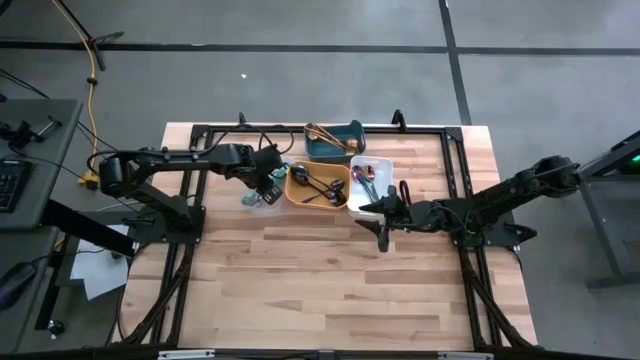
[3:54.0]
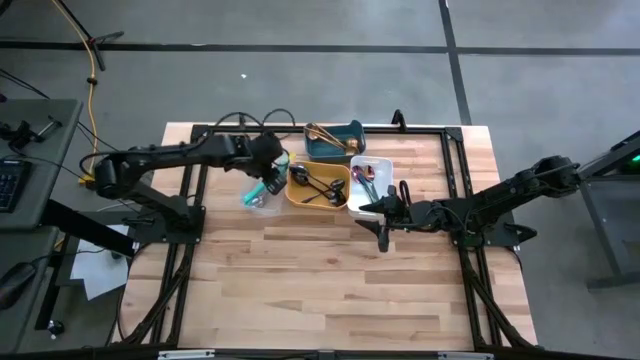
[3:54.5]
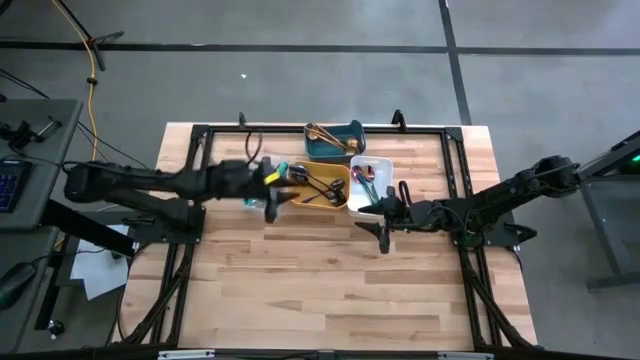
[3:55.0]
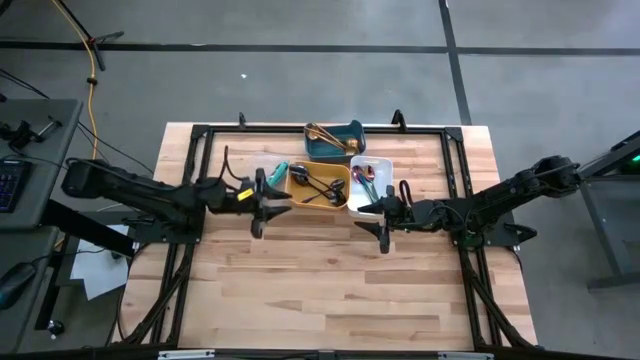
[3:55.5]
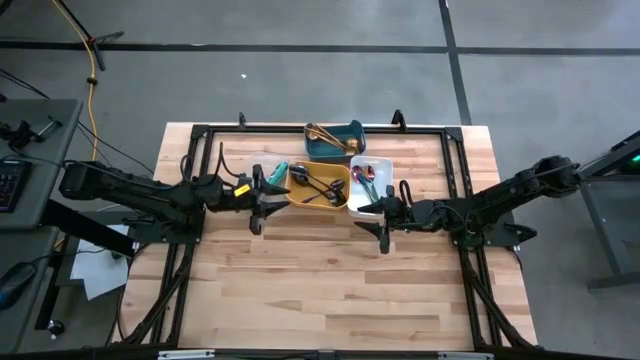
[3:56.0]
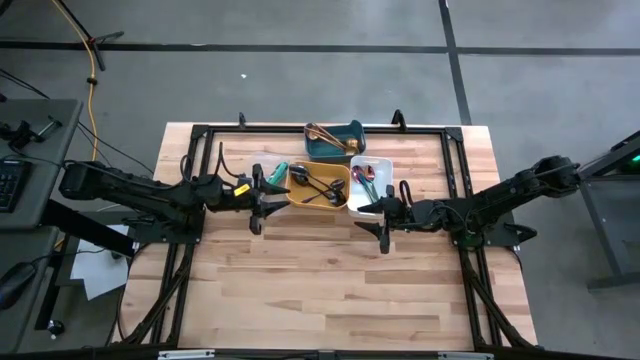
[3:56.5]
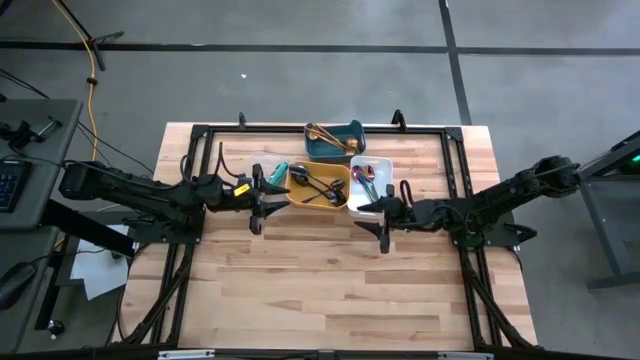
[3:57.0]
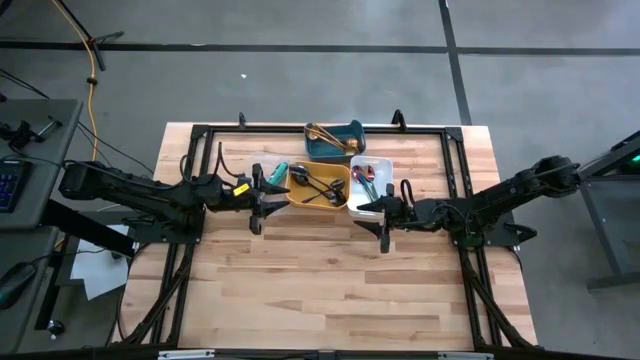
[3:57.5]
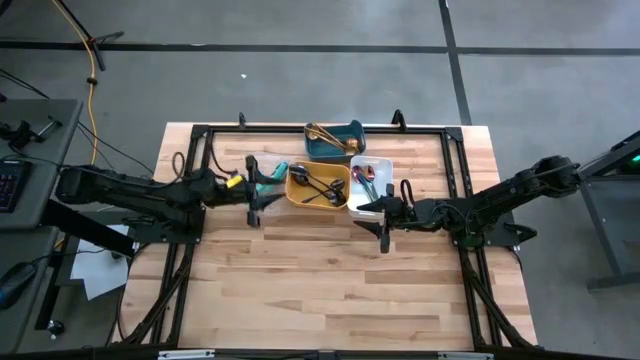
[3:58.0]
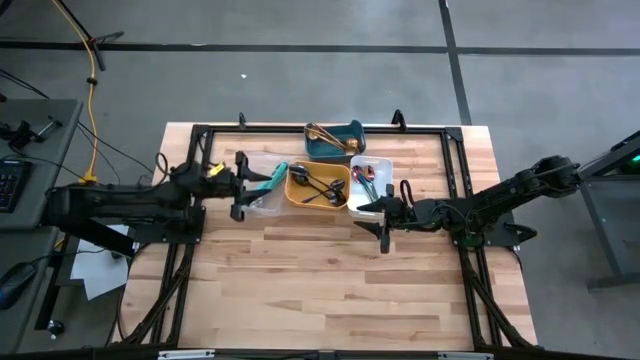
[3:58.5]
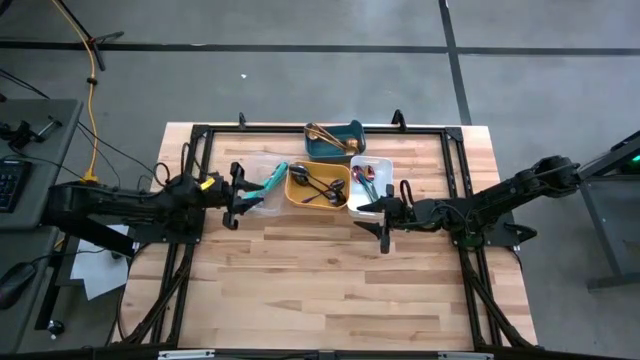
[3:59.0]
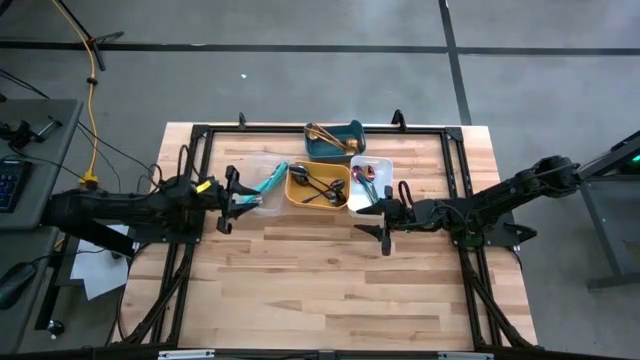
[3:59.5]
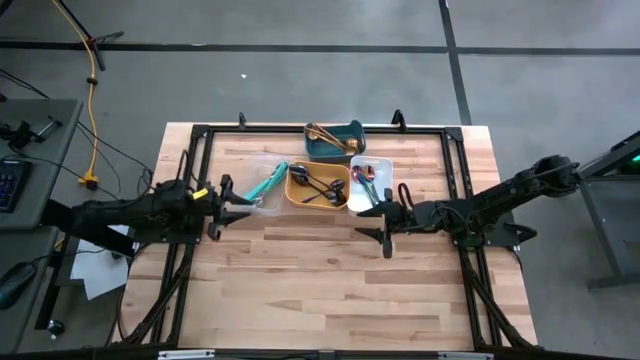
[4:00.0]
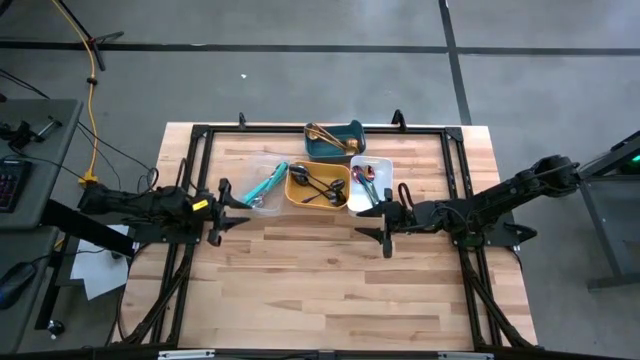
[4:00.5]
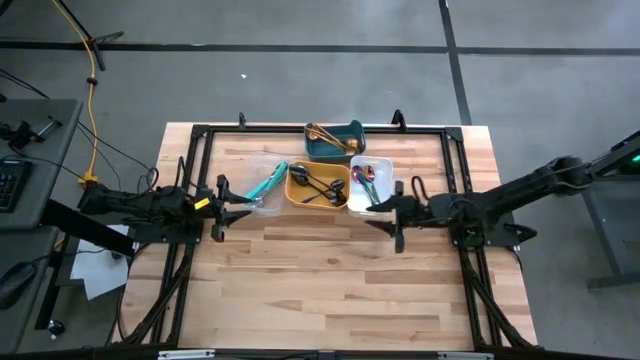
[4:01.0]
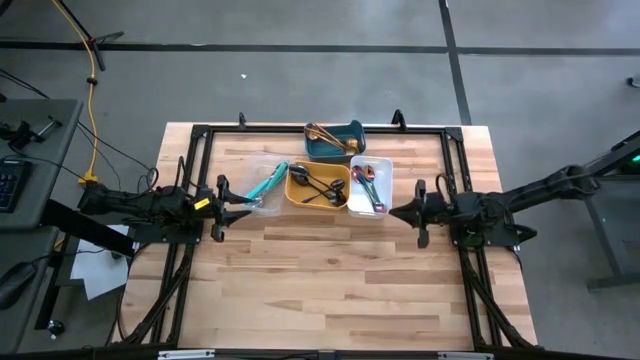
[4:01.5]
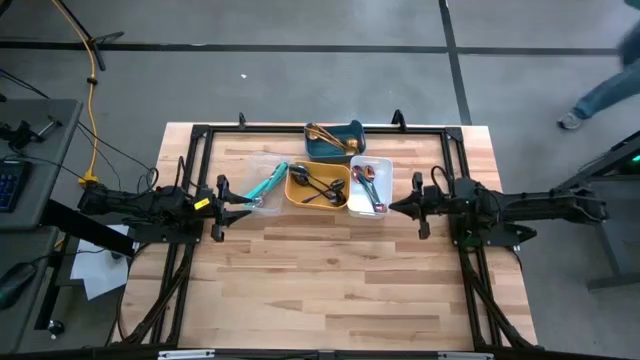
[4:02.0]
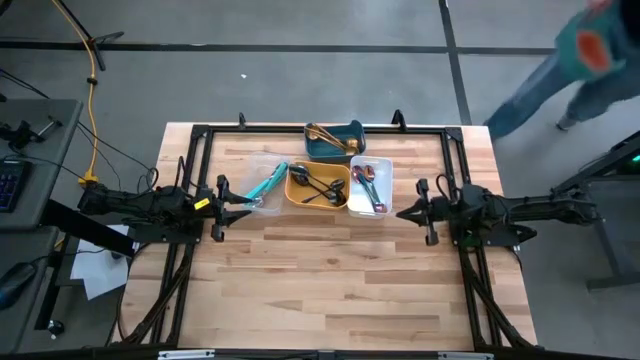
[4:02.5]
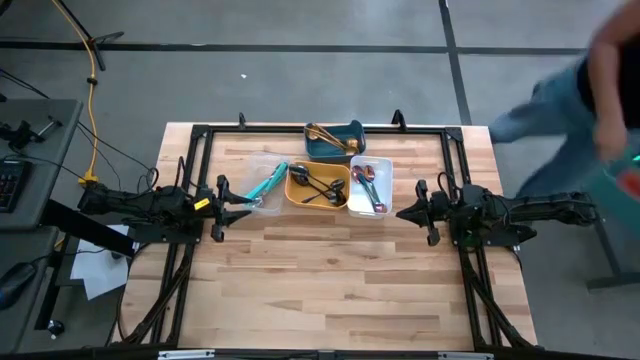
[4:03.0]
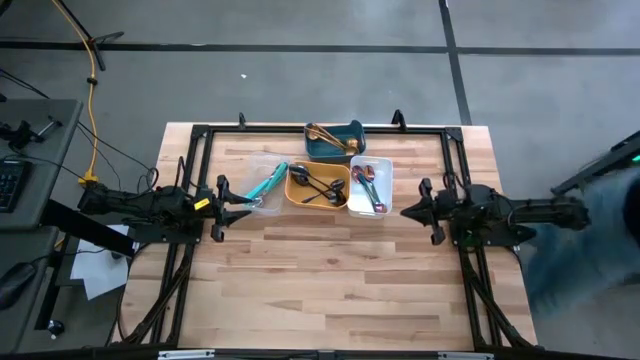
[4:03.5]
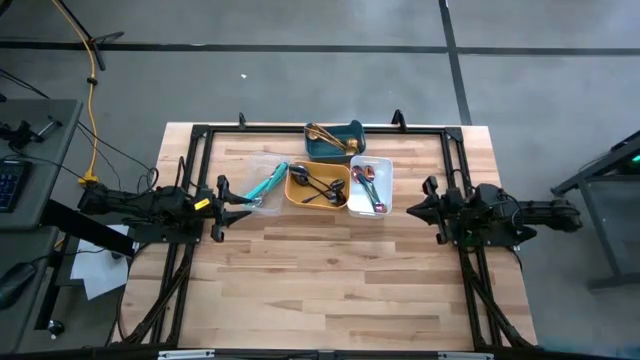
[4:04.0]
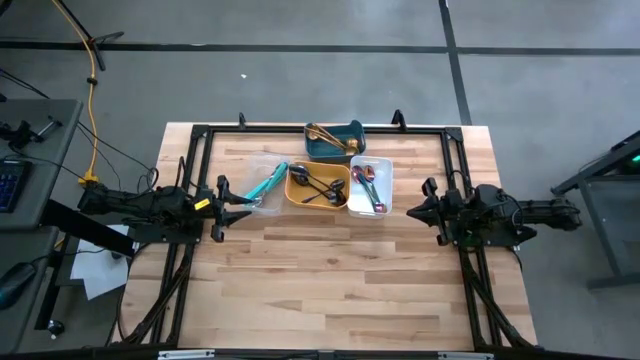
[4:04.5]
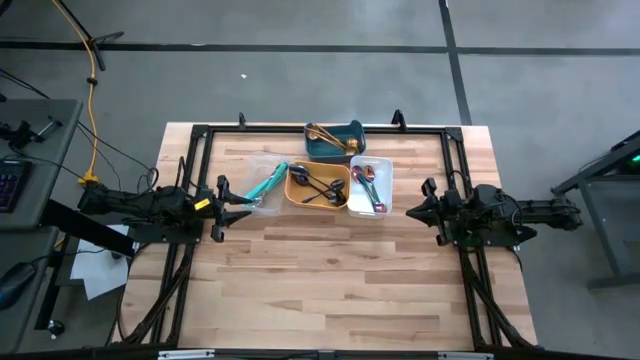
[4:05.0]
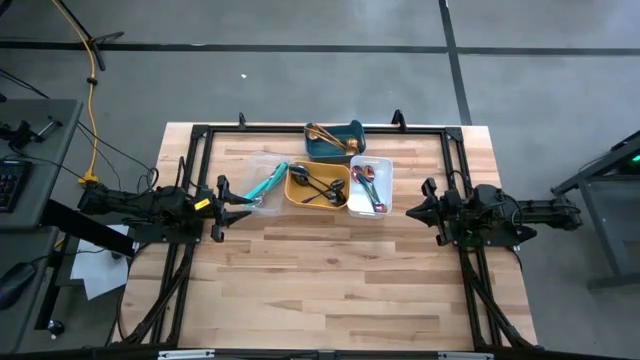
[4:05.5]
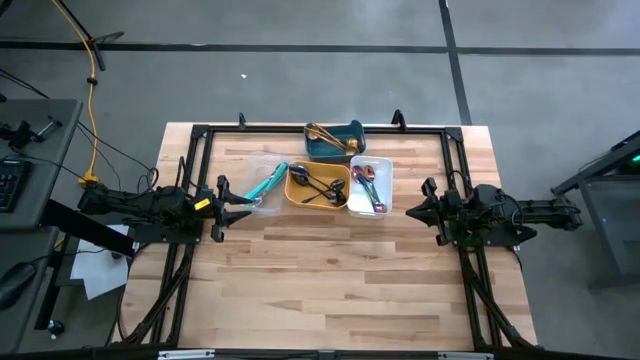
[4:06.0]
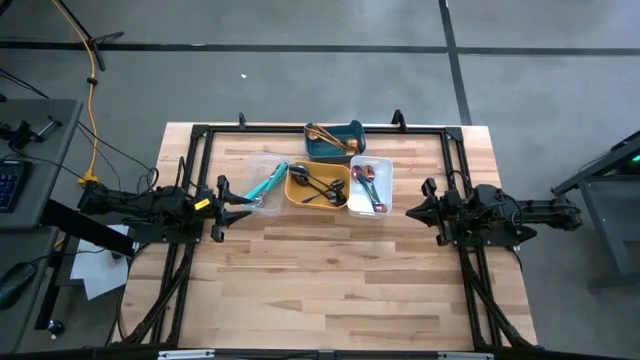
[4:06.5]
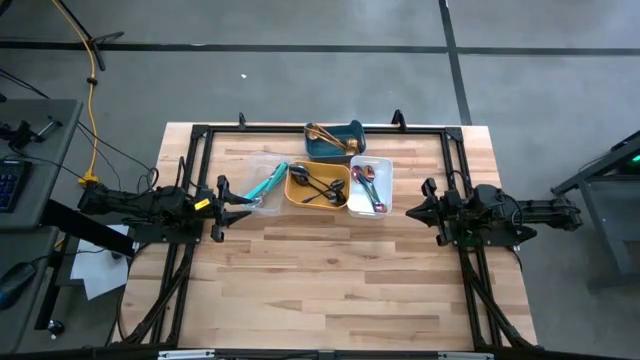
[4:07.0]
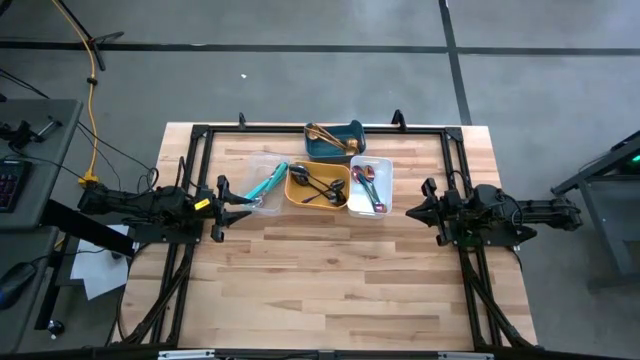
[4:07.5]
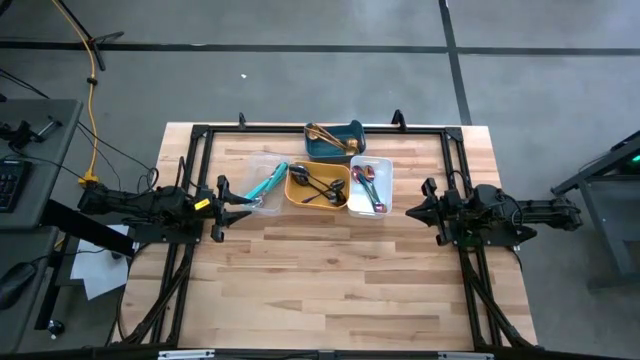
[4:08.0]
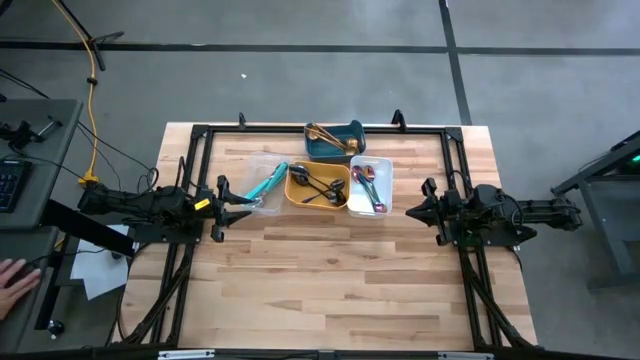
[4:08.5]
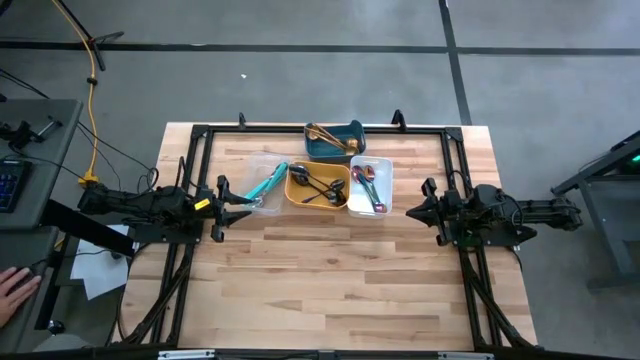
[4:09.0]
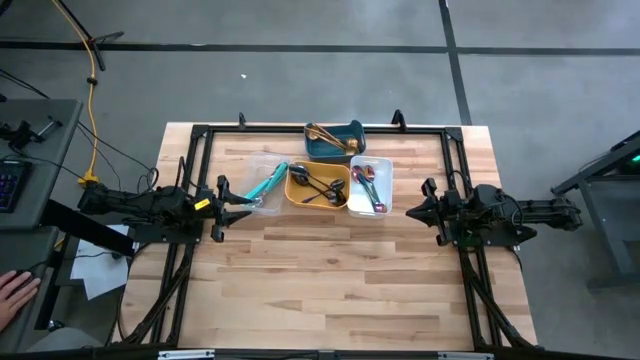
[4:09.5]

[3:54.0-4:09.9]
Task: Sort silverware by color (type)
Return to Home Position

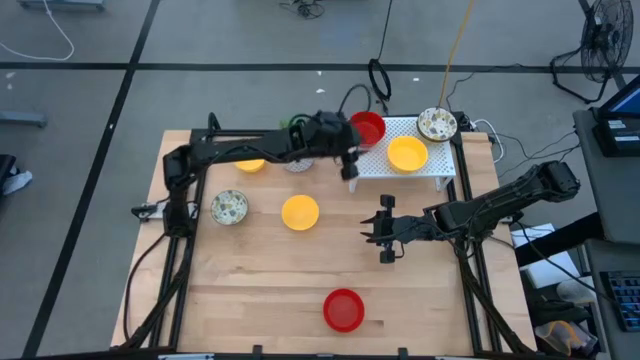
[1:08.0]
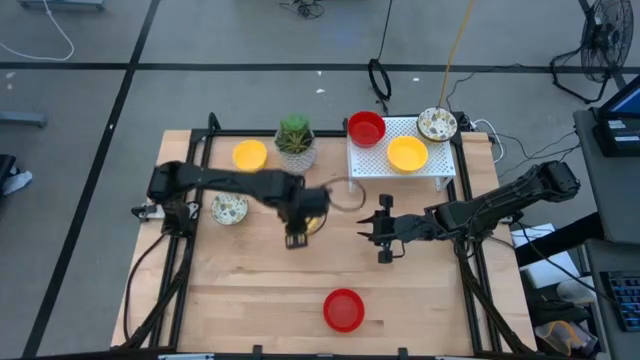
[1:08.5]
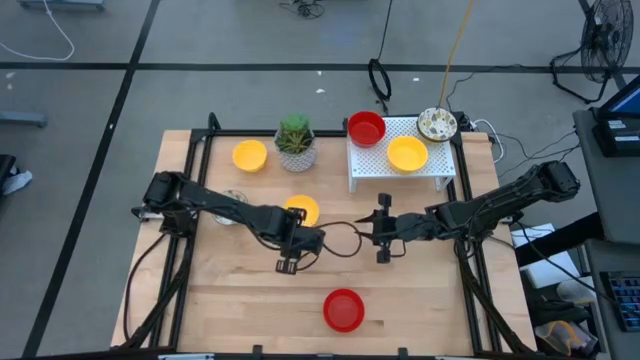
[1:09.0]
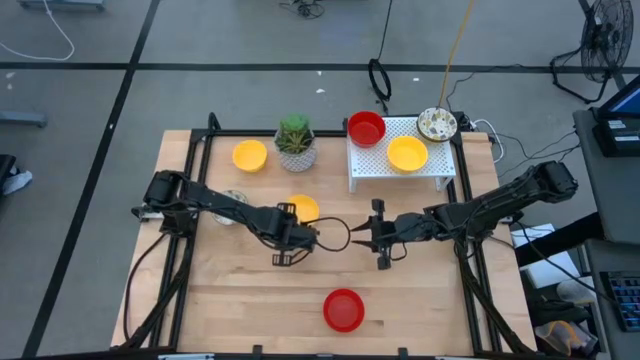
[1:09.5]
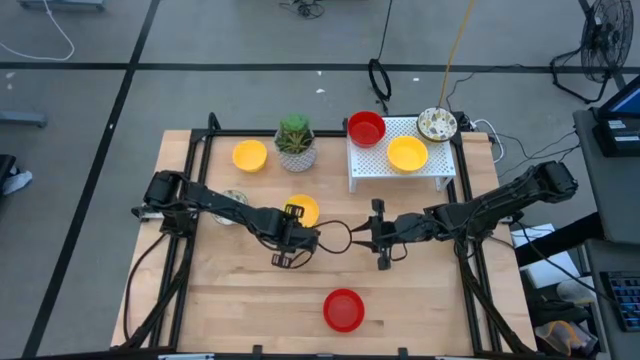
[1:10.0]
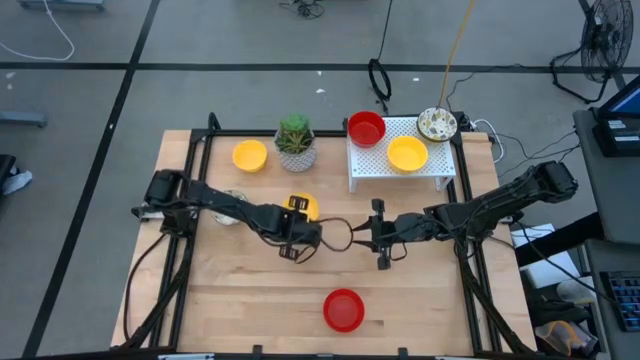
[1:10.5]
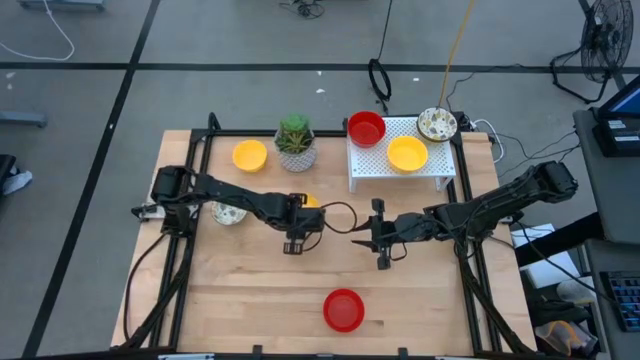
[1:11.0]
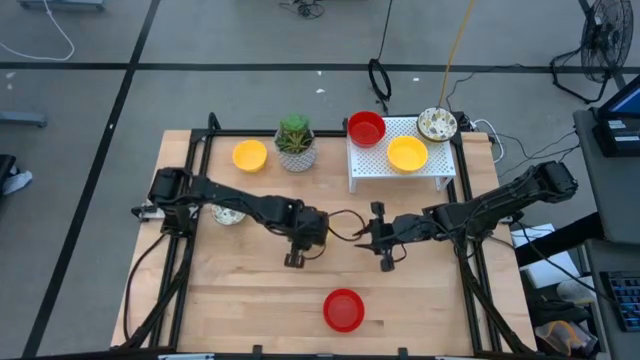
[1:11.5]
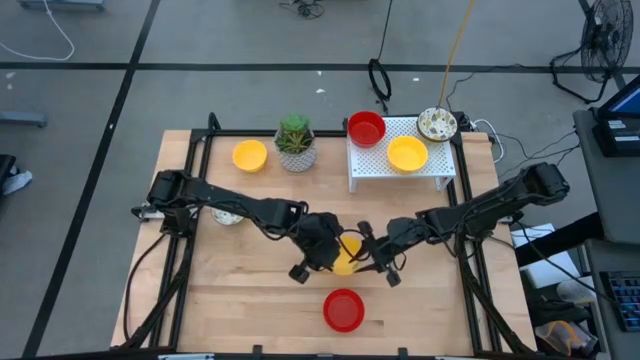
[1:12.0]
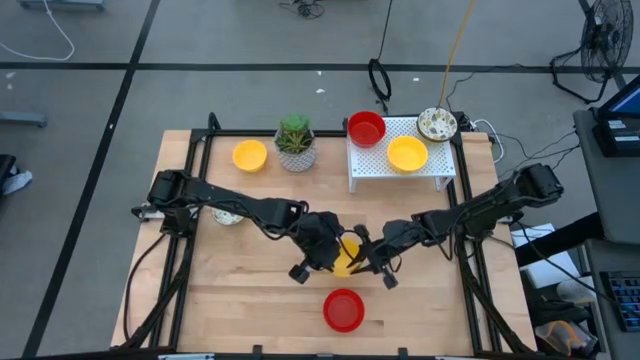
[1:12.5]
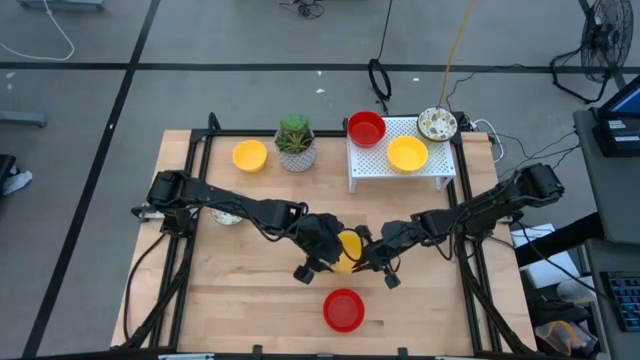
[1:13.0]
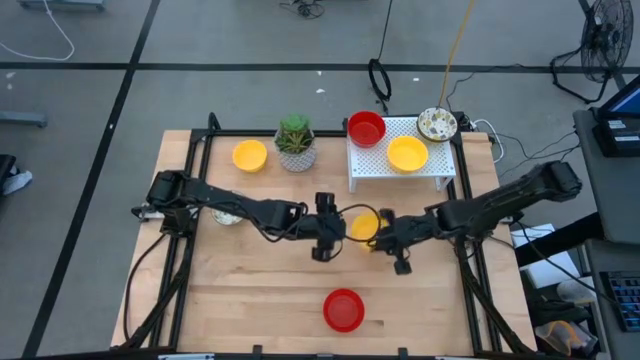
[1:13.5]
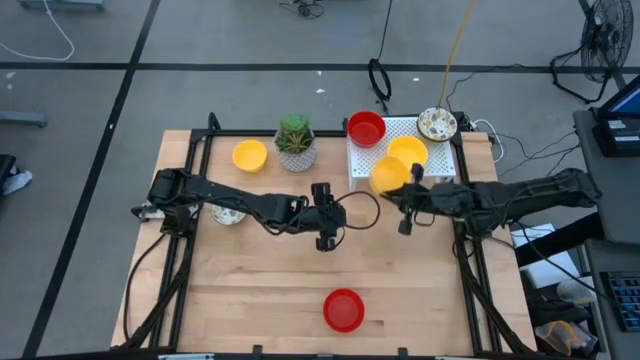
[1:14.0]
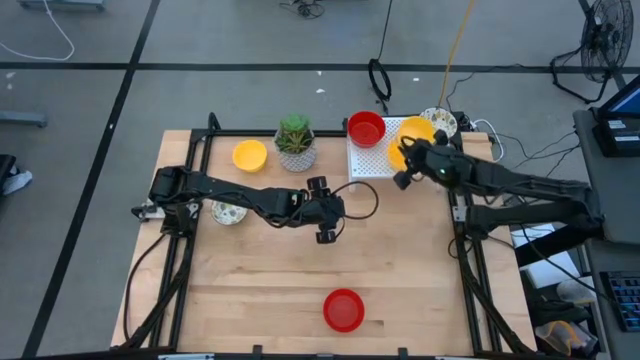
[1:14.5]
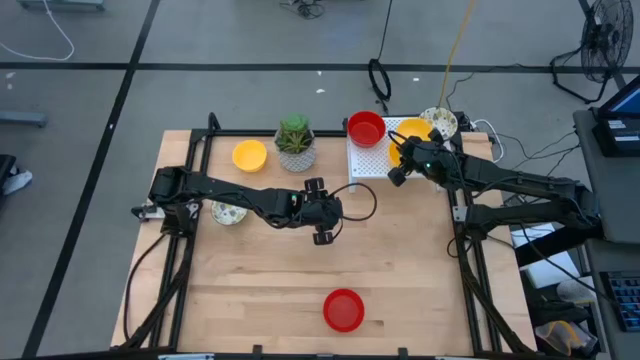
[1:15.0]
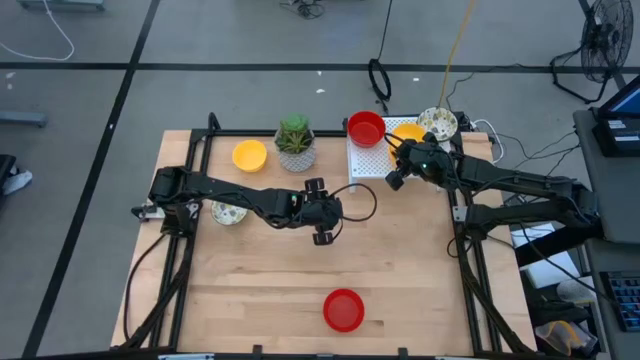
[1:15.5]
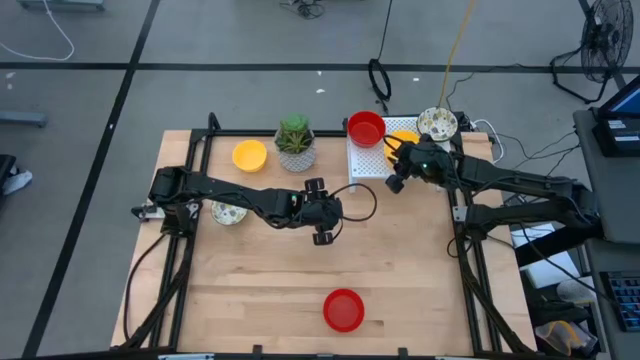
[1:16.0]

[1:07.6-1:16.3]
Task: Pick & Place Mini bowls
Stack the yellow bowl on top of the other yellow bowls on the shelf
